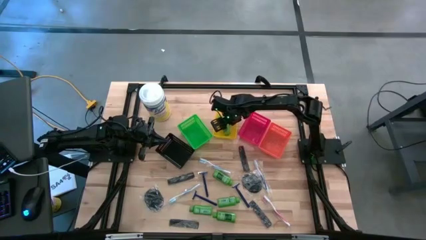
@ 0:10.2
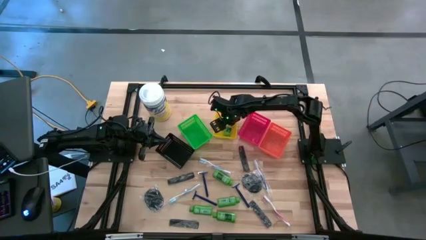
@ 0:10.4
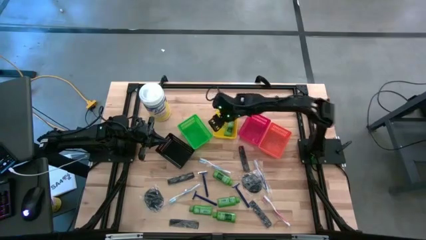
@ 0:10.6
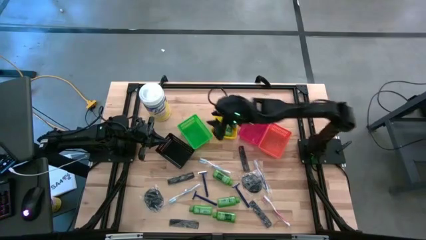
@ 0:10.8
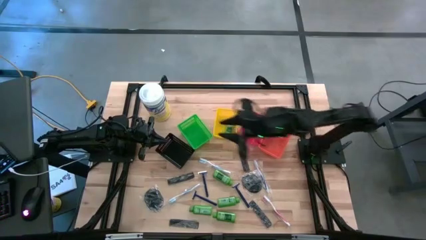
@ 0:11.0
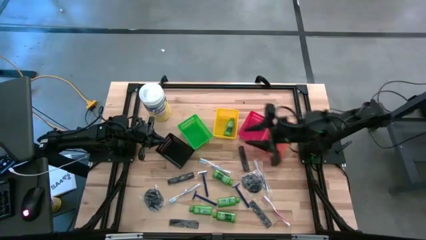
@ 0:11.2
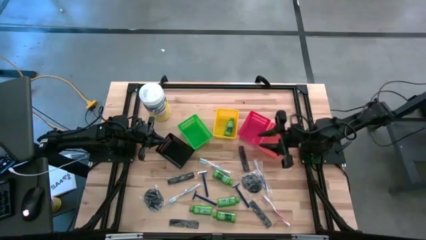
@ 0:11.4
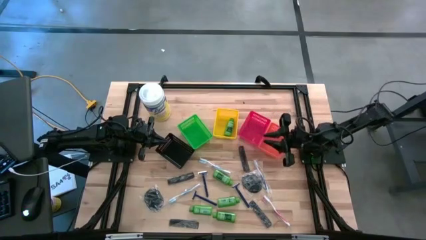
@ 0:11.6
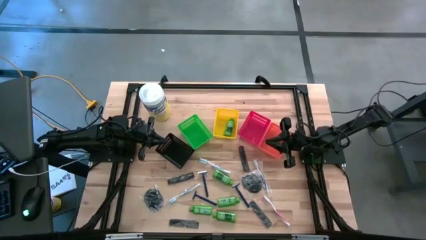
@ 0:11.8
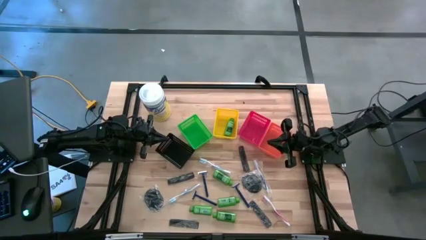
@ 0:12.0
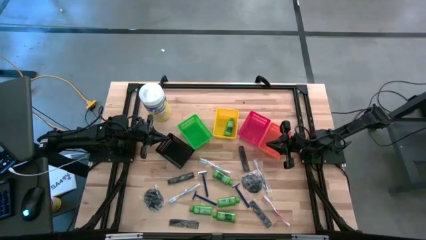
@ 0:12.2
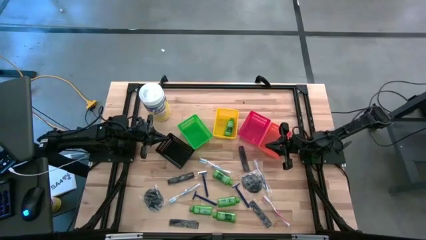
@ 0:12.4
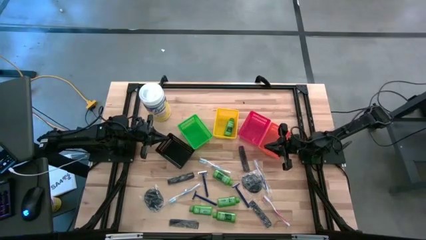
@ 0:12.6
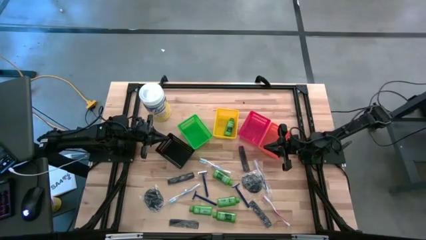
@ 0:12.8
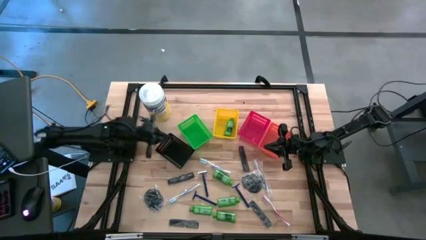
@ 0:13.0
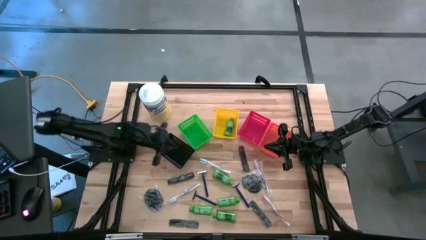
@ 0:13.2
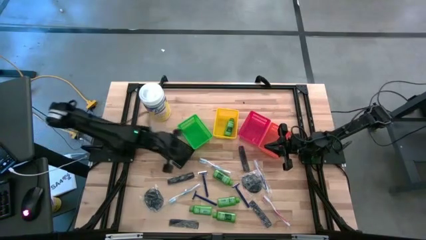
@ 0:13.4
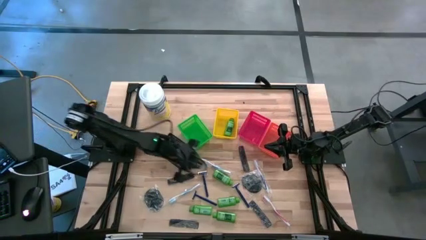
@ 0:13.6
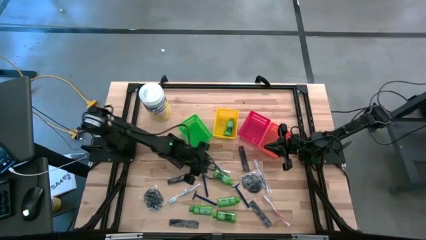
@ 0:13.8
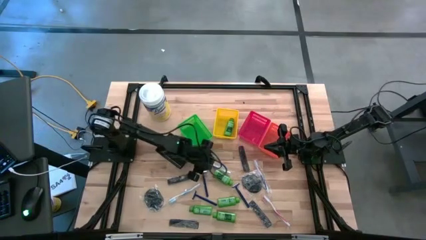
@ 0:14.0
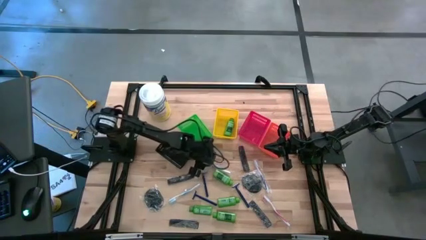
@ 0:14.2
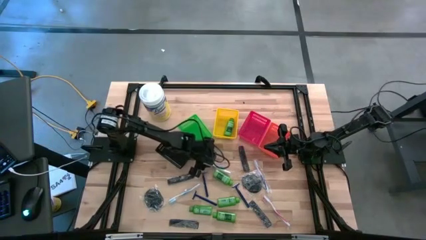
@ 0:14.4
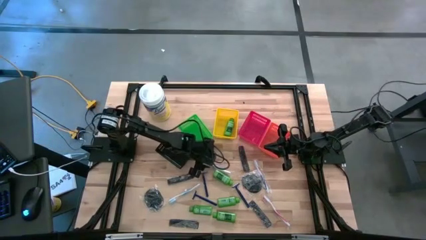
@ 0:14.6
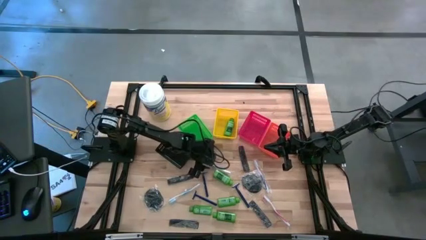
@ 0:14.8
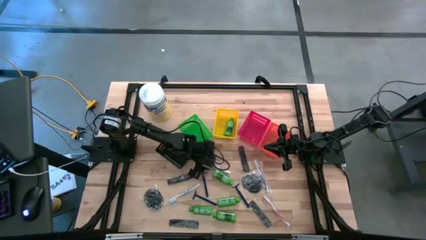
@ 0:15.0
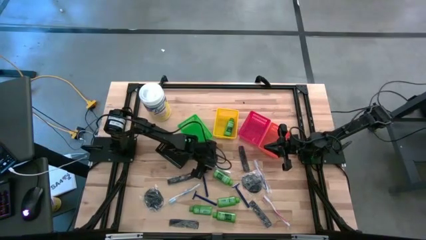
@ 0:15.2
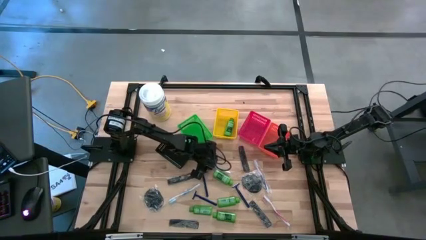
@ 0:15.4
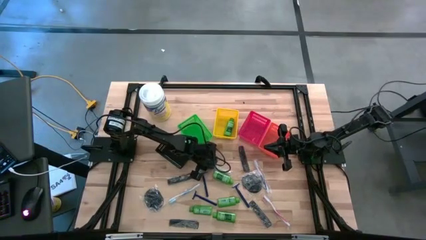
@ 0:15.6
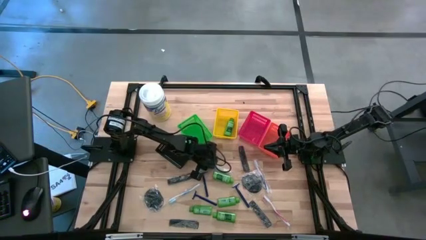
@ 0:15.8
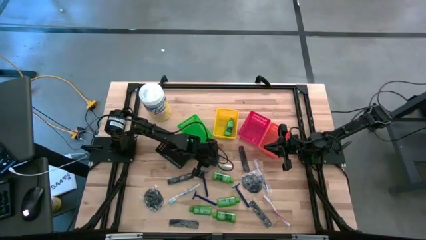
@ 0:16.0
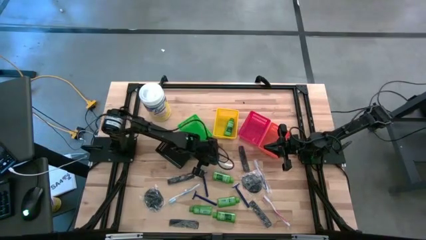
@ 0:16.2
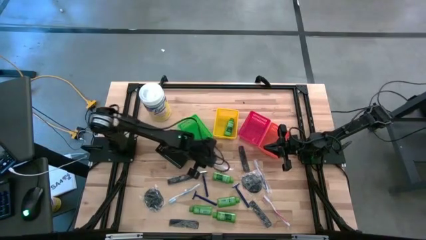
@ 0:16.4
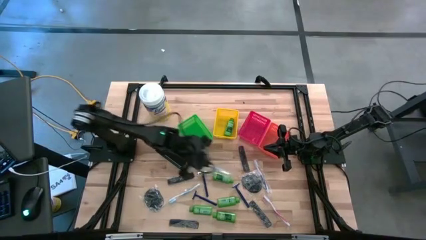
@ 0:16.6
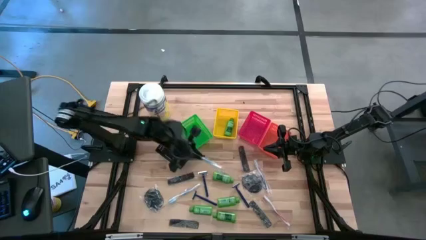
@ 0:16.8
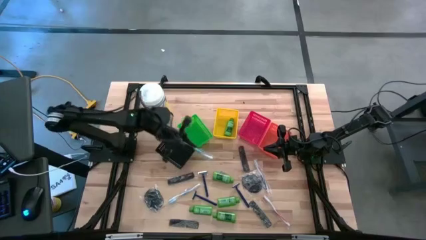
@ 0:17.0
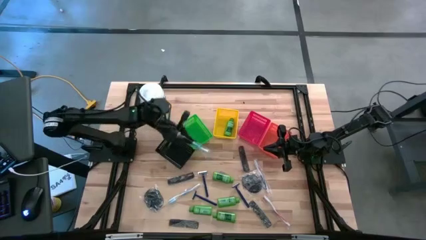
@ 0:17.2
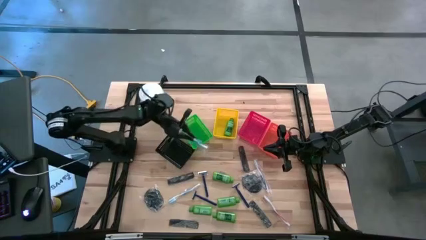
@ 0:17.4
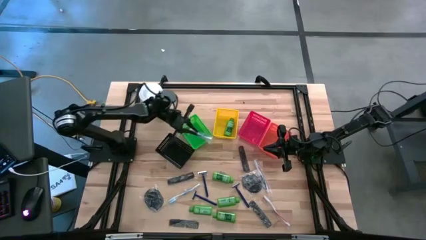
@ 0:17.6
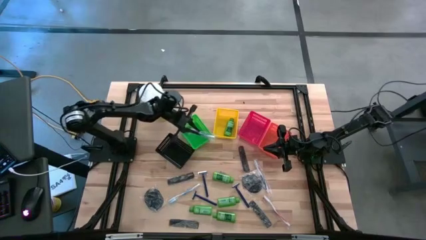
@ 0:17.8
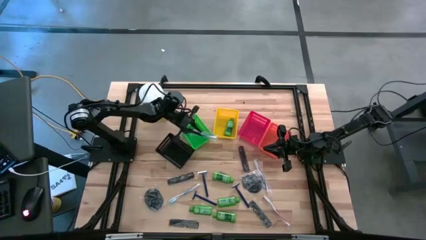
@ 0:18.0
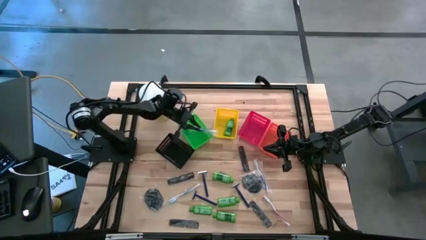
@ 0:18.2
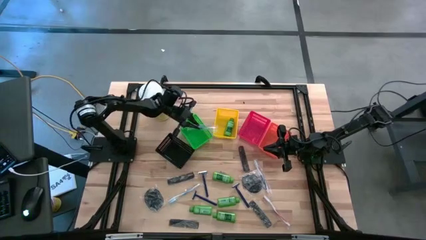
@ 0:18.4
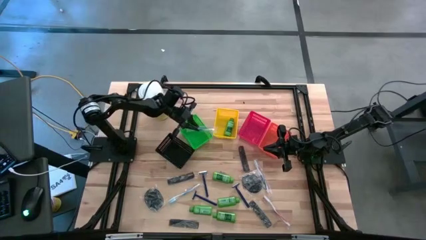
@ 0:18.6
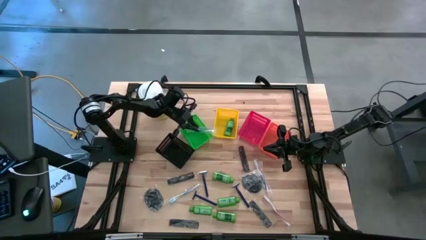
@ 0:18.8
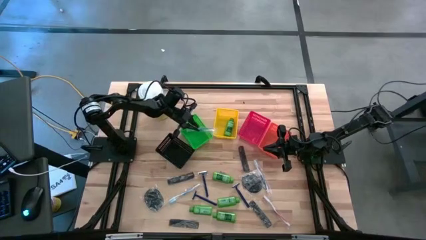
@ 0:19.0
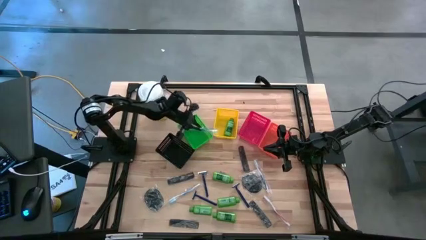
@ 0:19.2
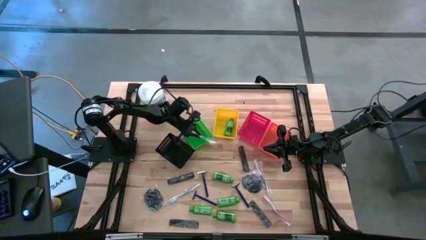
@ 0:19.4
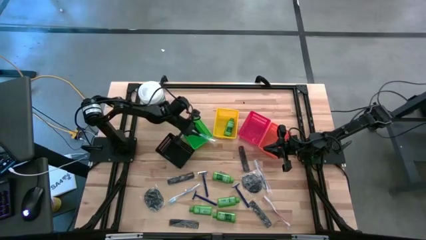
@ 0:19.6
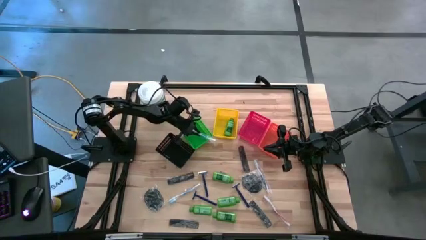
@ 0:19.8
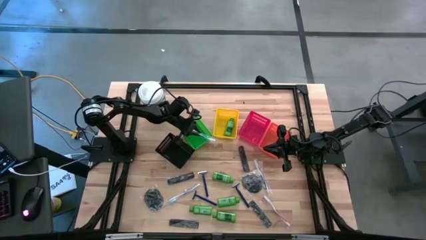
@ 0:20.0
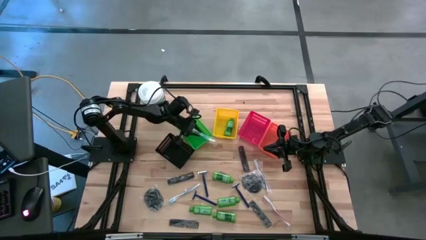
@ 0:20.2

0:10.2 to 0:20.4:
Task: Pick & Place Travel size toiletries
Put the blue toothbrush into the green bin

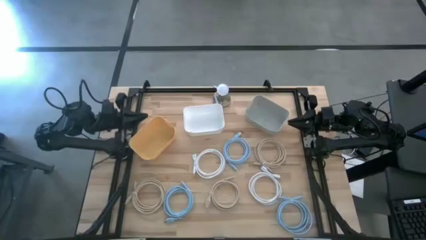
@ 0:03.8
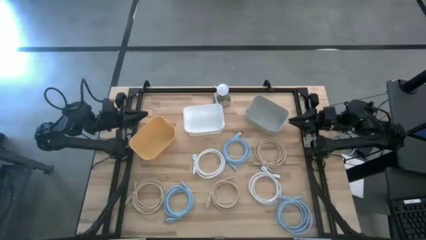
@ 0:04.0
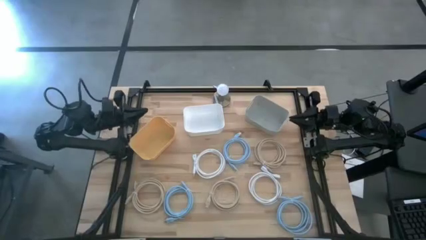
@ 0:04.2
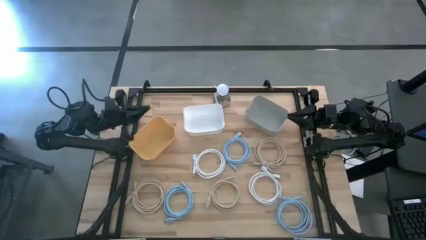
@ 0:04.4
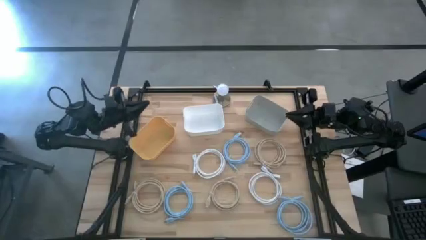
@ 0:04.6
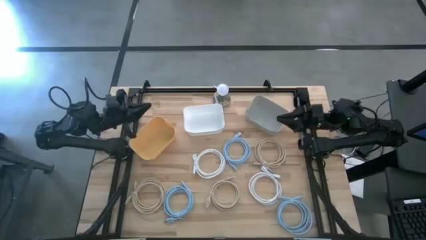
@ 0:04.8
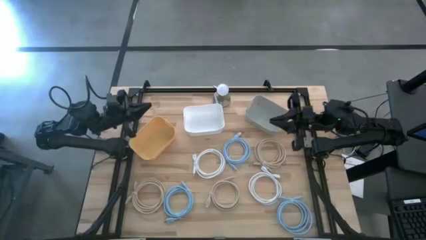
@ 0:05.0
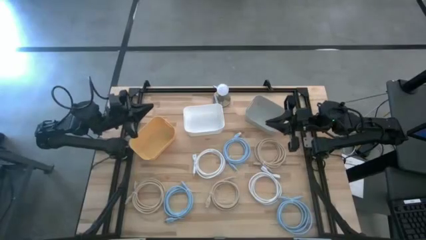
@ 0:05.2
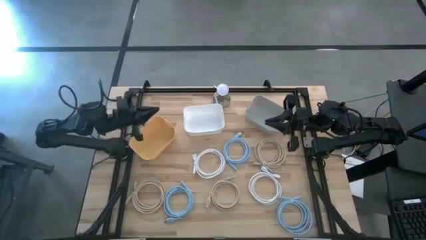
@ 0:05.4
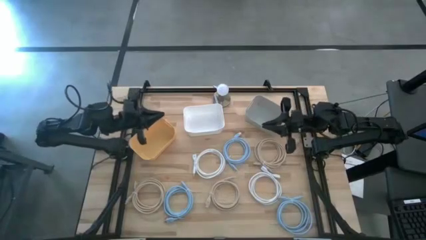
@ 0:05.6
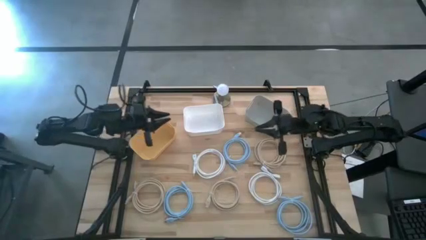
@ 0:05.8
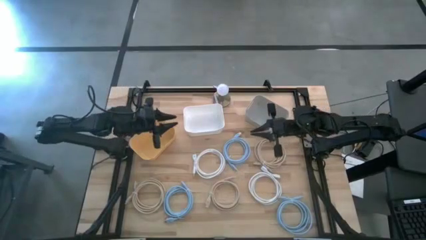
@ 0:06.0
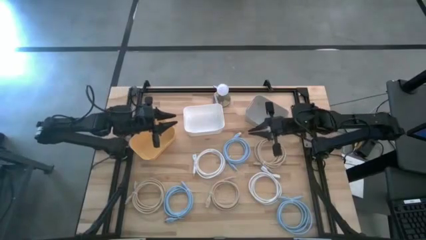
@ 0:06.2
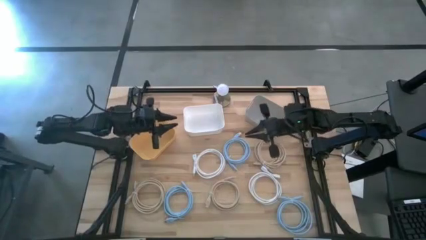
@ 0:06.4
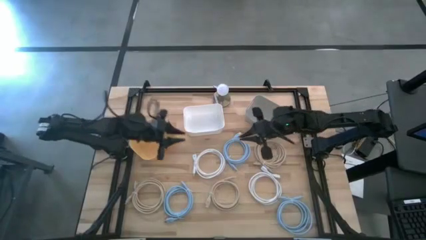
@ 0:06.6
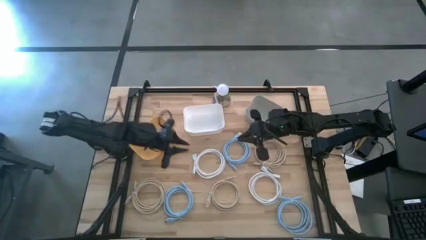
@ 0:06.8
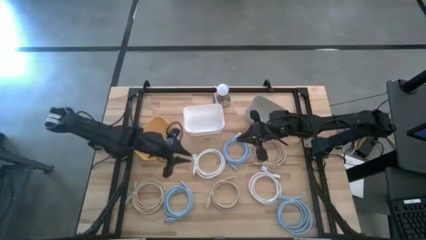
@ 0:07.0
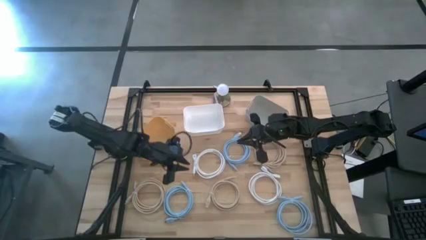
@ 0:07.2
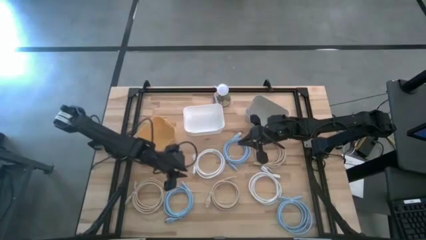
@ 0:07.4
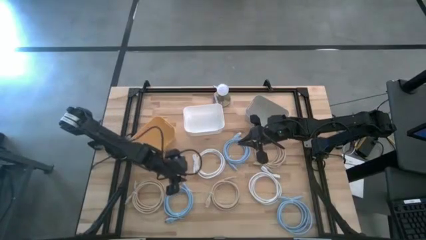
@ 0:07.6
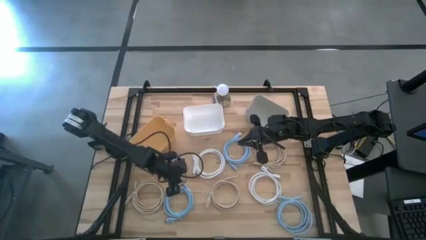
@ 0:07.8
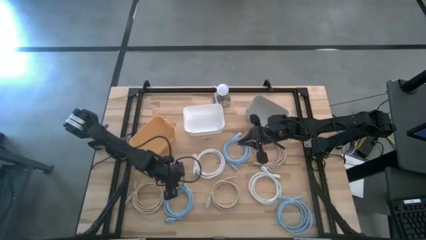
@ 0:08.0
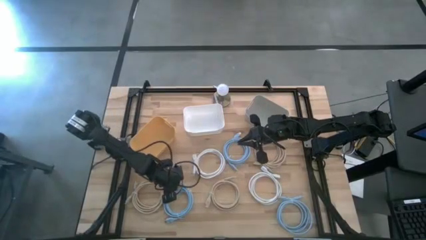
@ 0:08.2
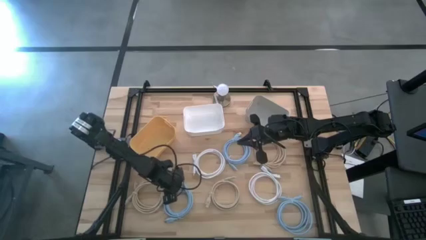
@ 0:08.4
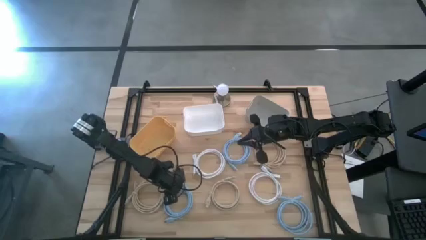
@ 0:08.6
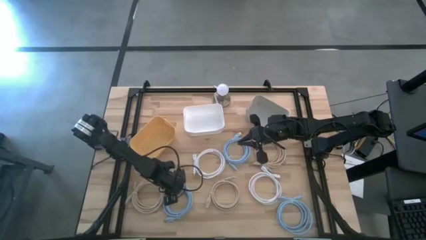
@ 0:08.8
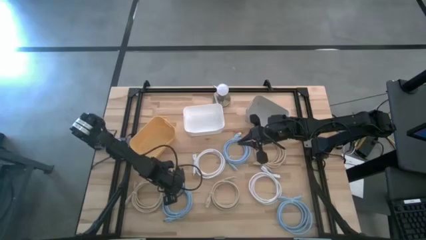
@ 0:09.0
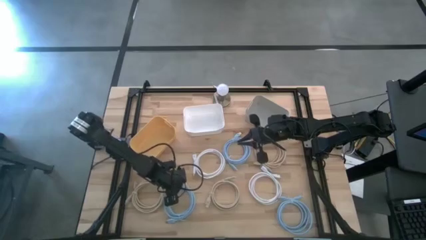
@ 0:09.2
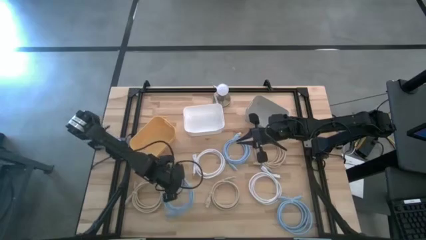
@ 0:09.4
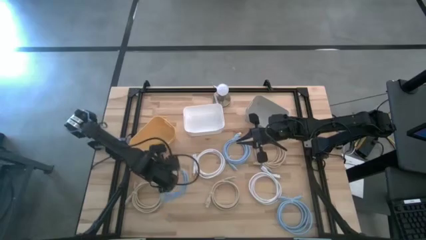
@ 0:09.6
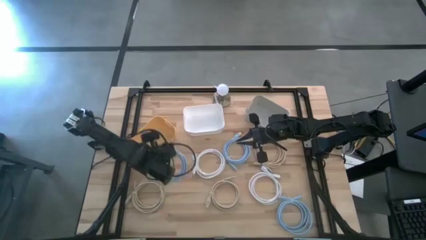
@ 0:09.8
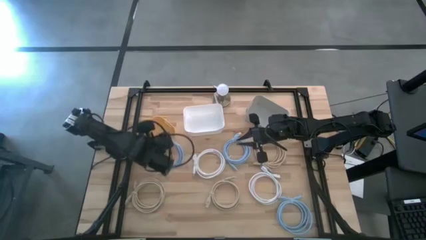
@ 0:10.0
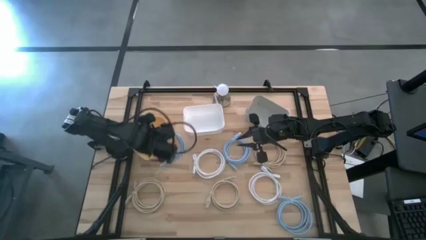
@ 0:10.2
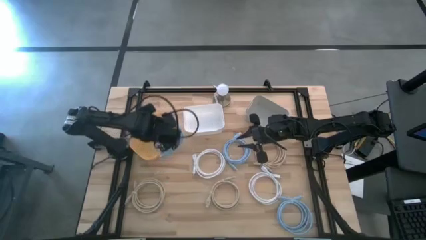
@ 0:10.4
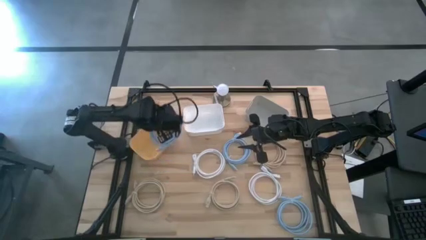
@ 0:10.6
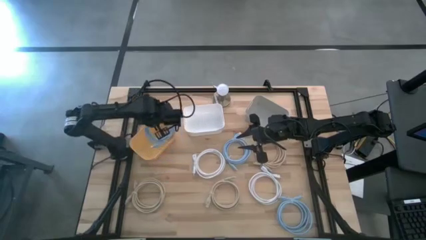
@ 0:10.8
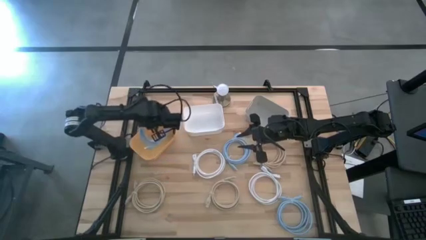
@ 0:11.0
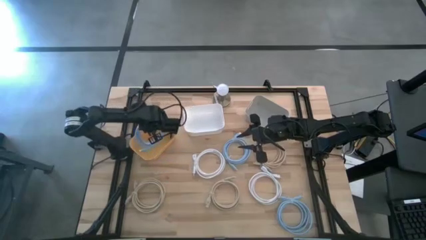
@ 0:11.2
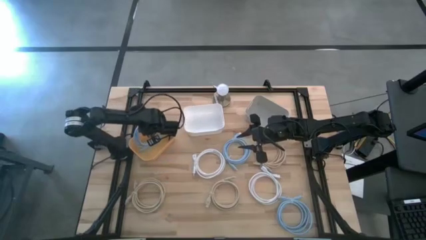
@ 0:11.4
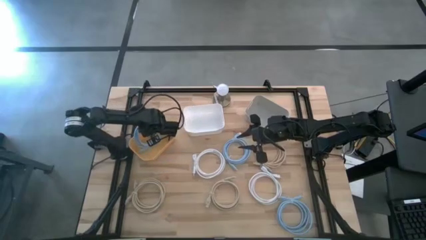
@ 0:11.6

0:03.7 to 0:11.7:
Task: Sort HDMI cables
Put the bottom left blue hdmi cable into the yellow bin
